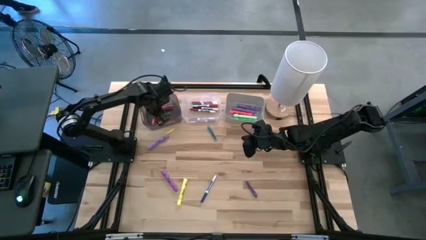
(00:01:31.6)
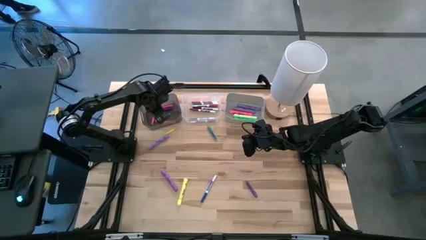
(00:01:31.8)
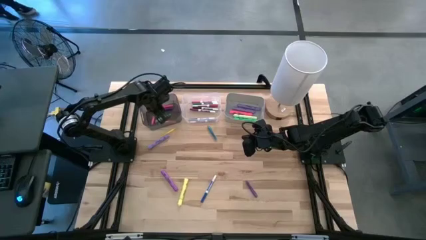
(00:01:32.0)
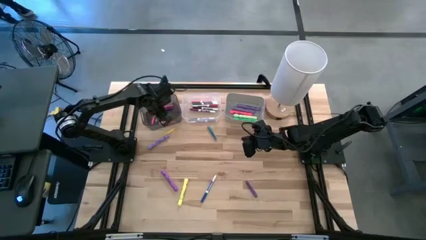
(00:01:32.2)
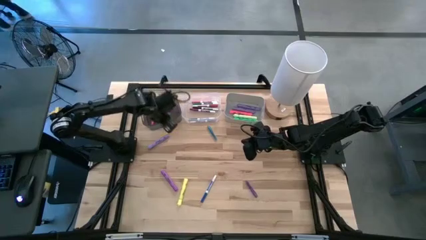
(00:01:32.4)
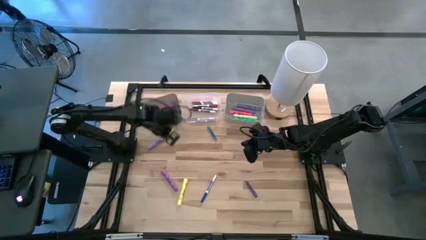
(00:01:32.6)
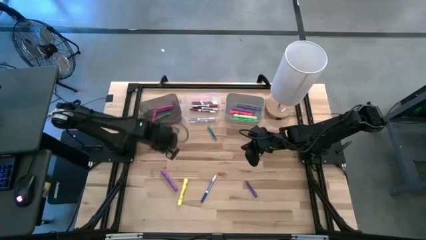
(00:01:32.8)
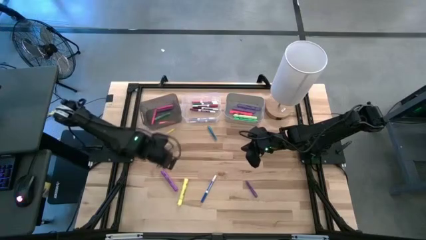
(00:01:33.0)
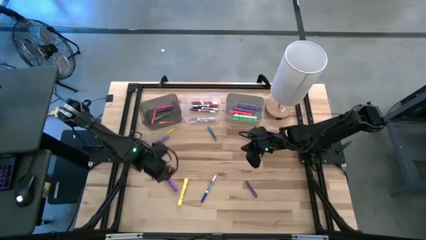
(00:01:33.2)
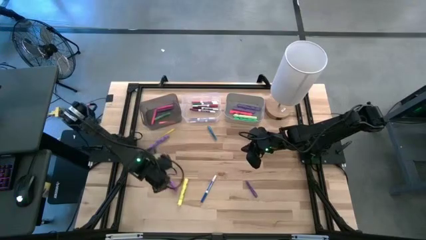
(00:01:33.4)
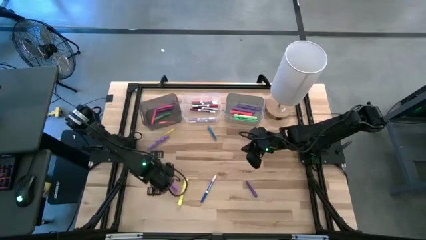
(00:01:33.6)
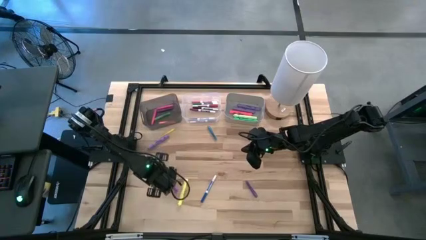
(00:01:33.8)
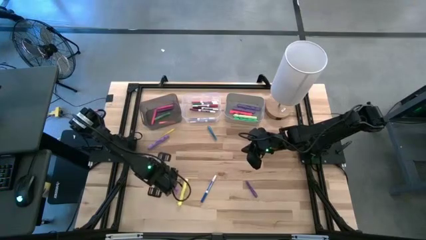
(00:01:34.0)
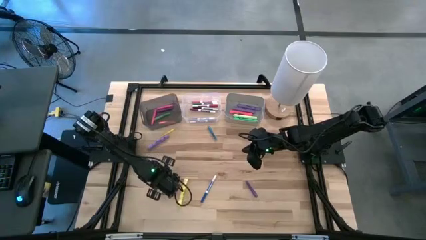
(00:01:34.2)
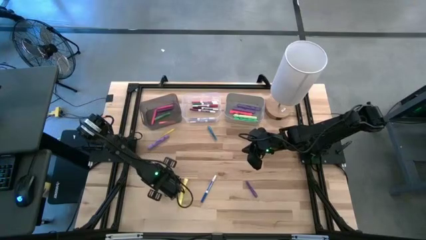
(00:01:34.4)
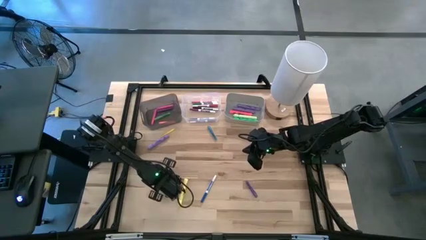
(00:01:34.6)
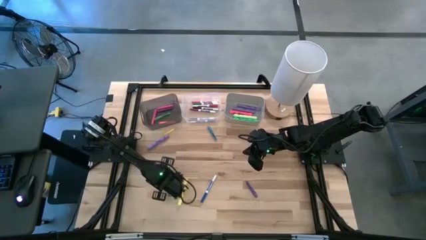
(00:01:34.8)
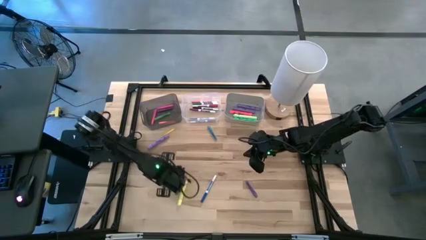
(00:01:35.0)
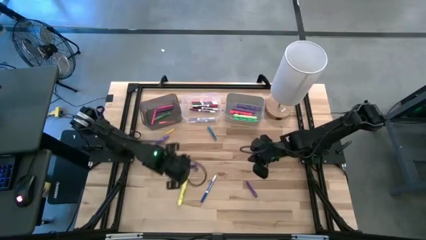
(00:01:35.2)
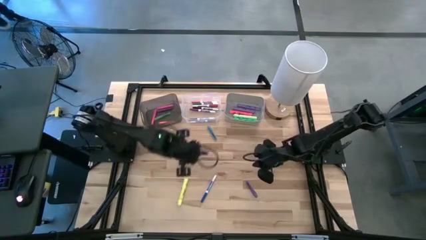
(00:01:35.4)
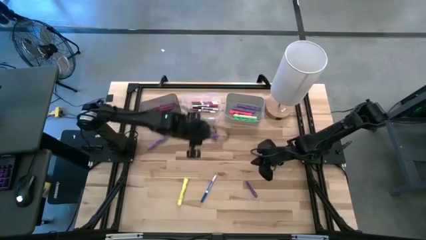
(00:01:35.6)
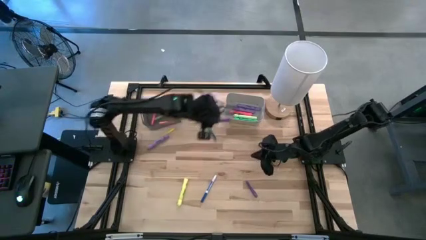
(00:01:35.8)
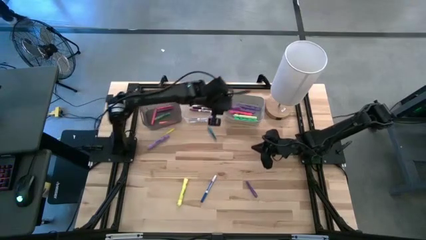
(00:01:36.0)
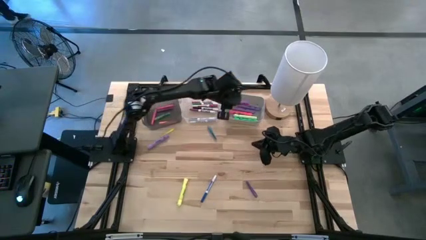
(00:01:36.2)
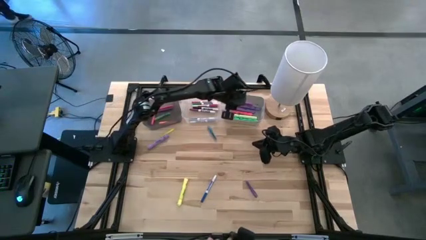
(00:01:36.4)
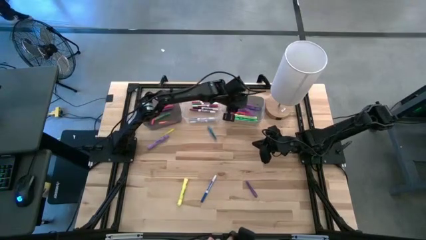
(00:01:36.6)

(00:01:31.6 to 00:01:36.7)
Task: Pick & Place Markers
Put the violet highlighter pen into the gray bin

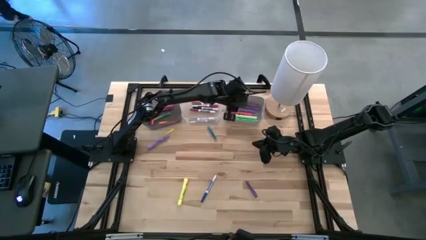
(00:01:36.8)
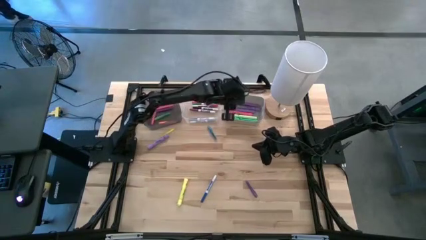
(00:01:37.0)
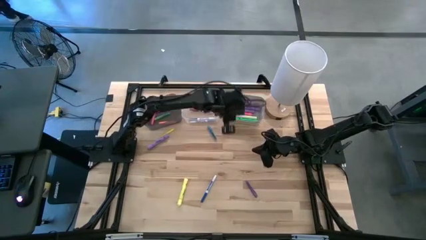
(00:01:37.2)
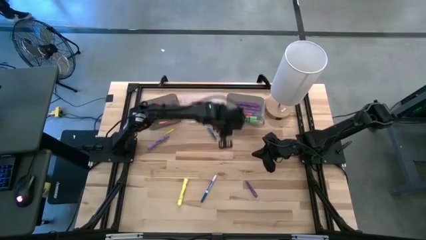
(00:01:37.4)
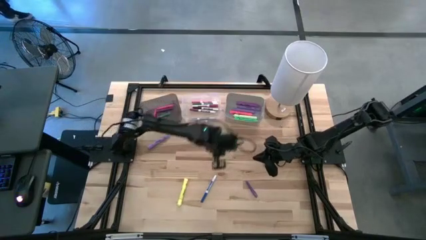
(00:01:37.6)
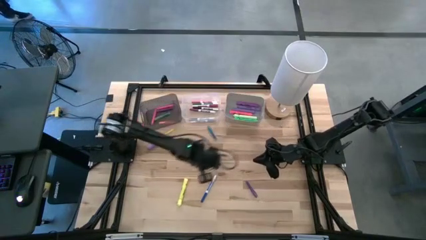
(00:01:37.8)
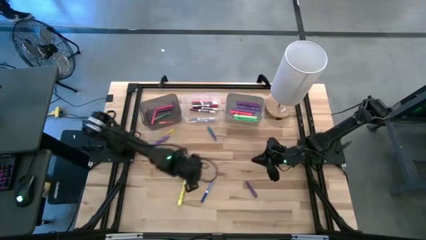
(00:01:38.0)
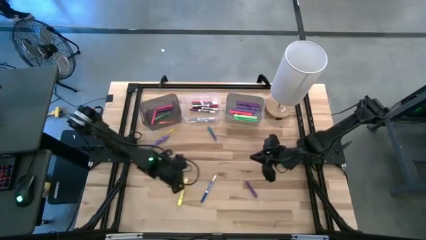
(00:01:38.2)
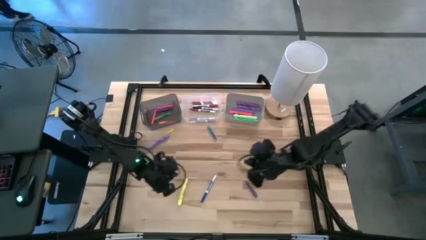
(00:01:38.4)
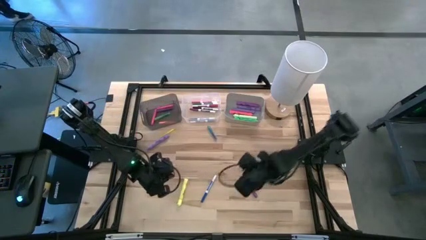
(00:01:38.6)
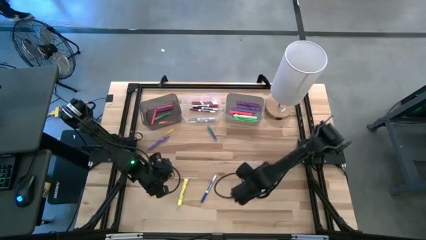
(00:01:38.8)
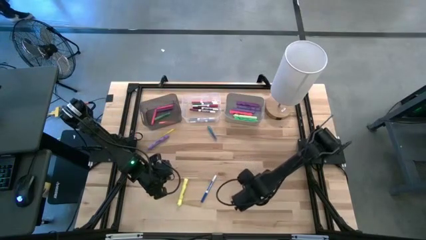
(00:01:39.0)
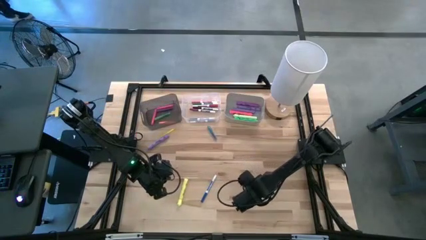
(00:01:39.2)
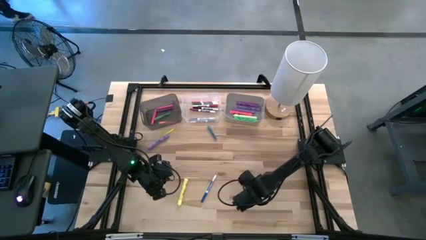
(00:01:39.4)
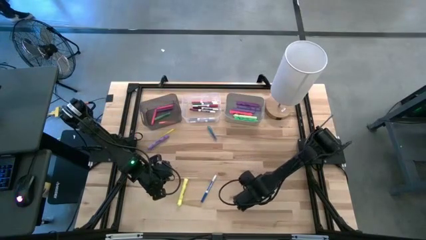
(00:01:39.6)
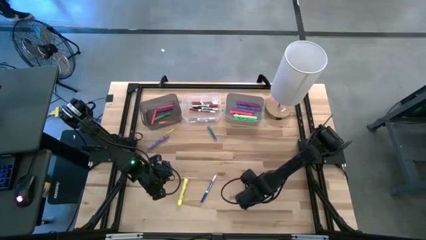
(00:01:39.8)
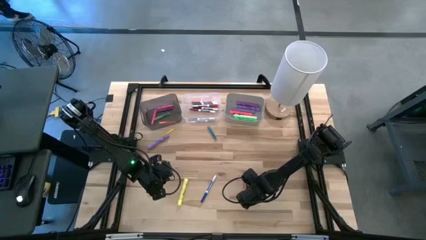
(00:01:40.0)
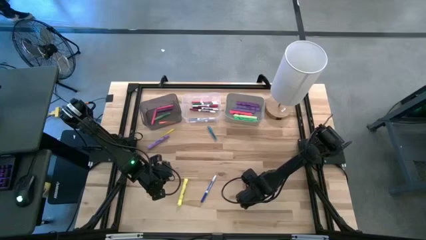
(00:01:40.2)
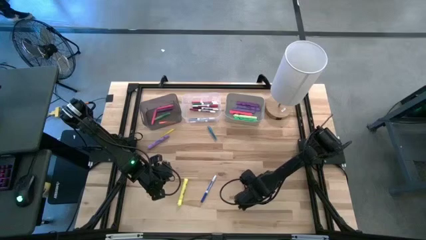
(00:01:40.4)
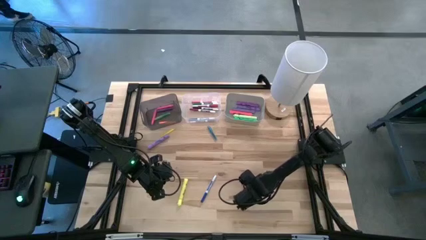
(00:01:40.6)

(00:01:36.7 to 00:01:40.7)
Put the violet pen into the black bin

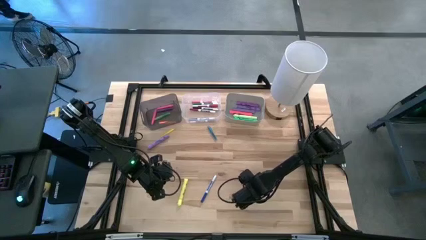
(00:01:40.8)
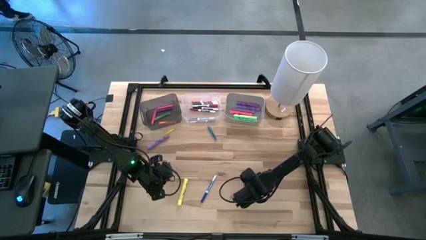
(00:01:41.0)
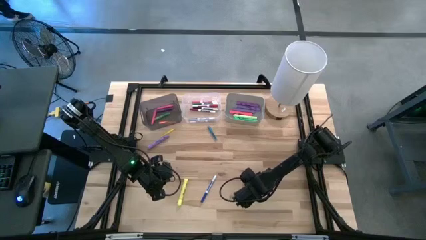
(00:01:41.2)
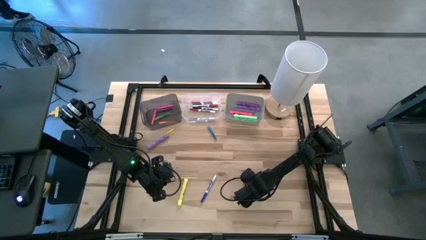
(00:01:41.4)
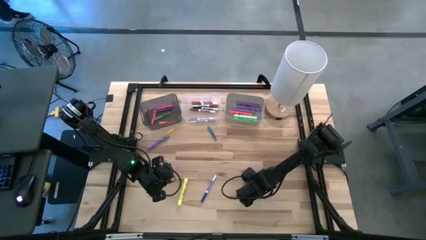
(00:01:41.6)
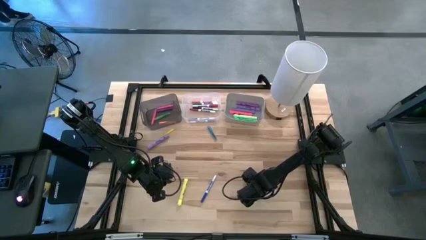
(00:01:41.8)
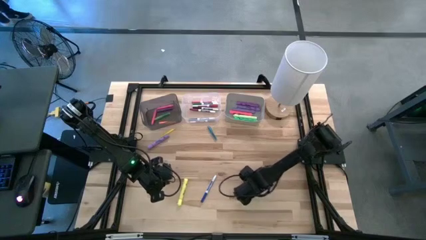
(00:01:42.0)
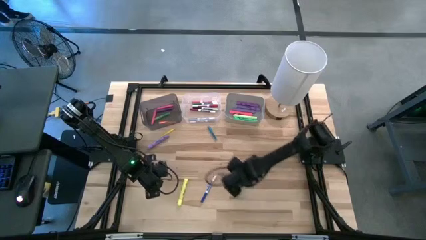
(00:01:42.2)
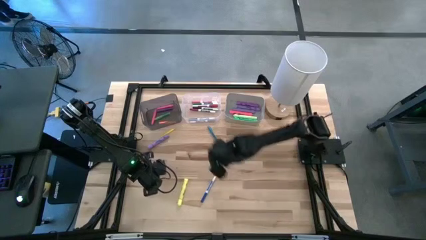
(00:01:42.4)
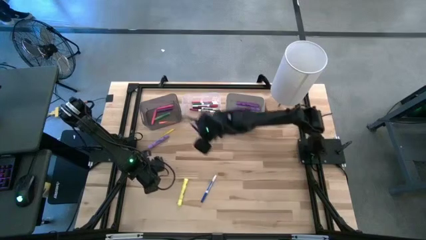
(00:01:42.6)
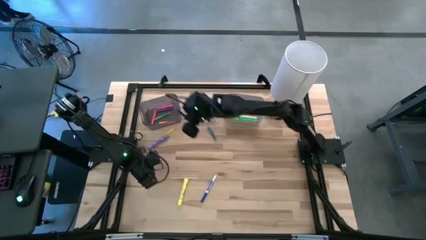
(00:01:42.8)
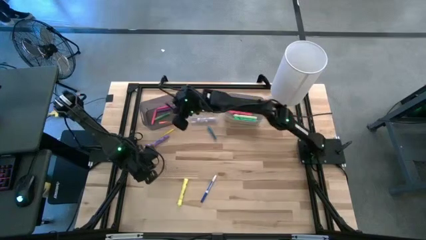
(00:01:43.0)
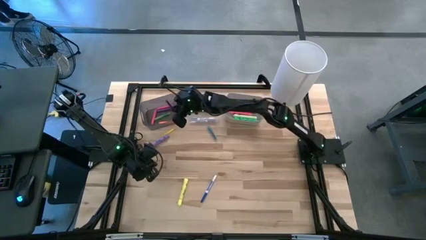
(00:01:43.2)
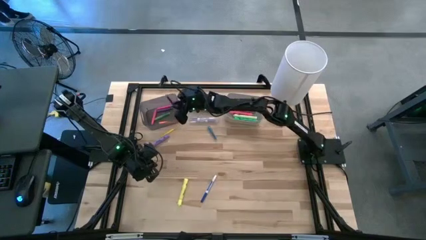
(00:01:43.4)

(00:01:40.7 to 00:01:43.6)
Put the violet pen into the black bin

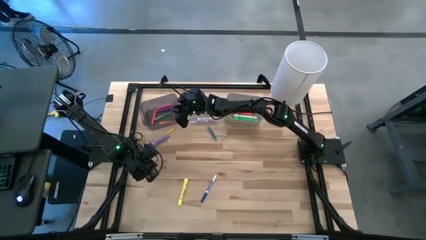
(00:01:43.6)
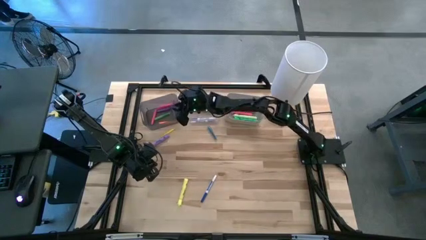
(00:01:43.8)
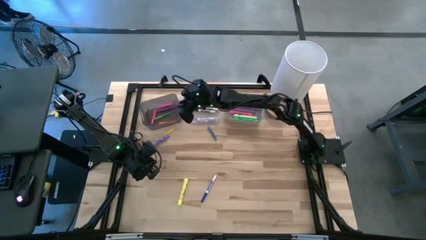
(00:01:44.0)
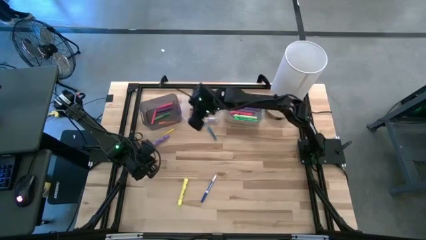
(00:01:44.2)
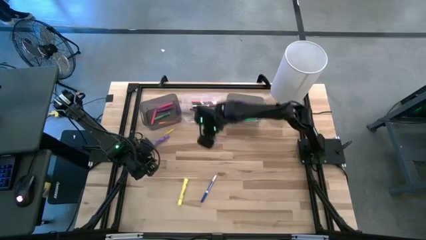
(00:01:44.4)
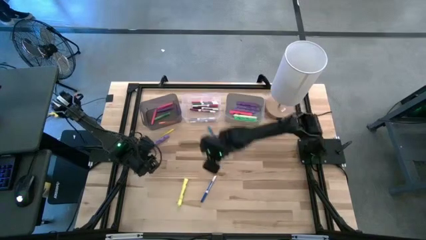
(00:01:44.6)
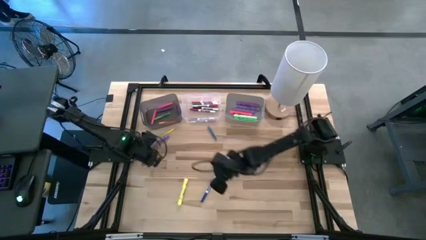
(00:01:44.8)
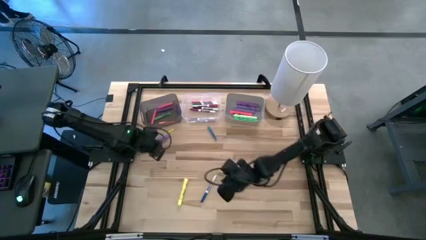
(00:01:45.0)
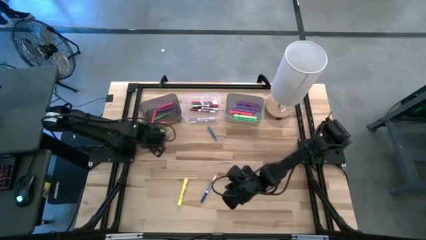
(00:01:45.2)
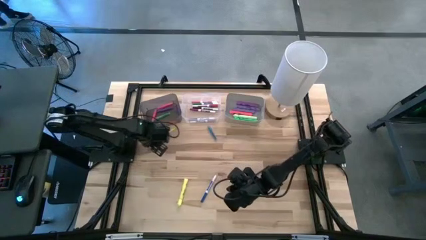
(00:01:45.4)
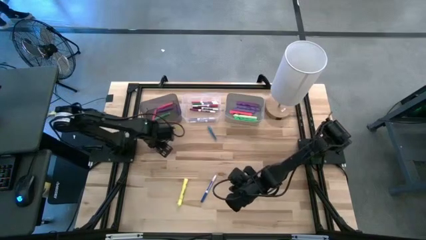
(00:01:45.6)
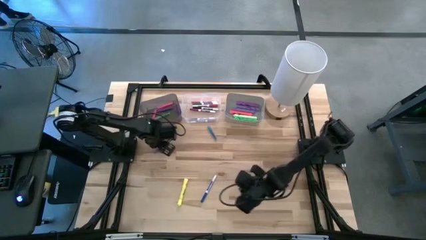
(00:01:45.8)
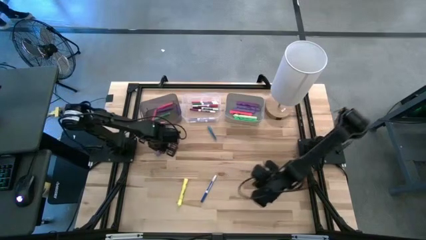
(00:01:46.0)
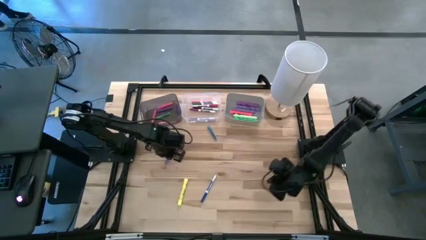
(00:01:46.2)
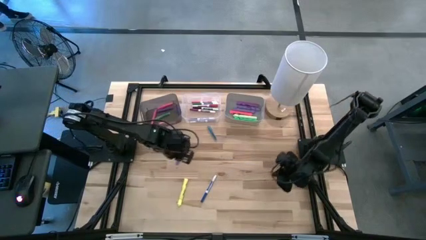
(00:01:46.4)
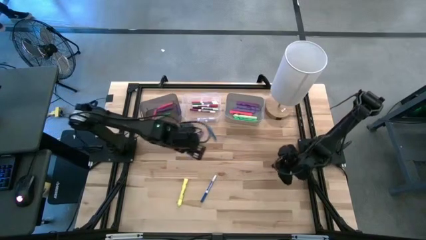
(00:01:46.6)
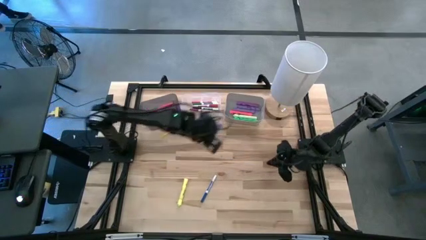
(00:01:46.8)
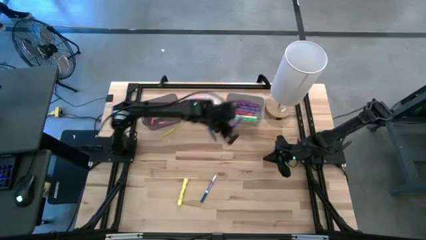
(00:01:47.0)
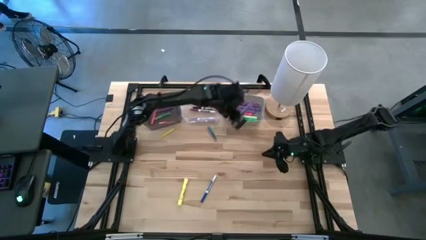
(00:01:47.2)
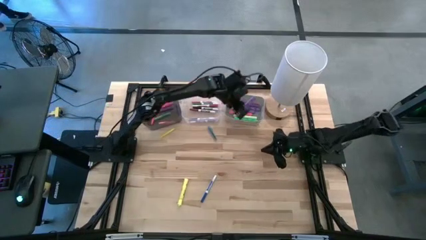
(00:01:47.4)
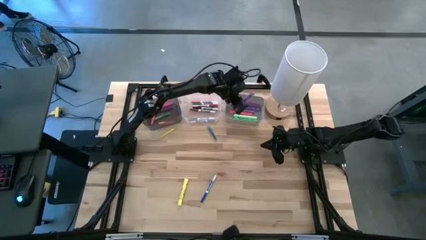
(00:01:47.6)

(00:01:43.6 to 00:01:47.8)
Put the violet highlighter pen into the gray bin

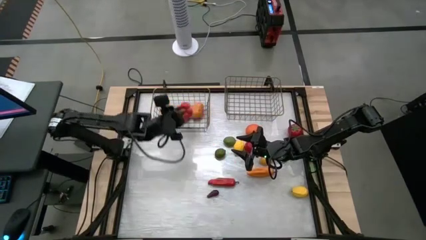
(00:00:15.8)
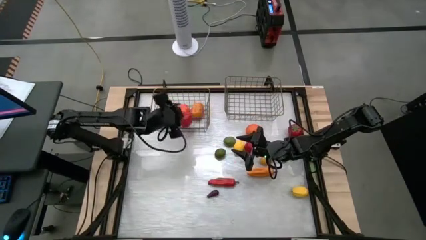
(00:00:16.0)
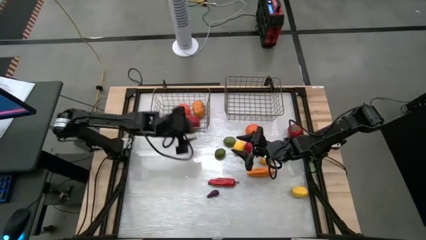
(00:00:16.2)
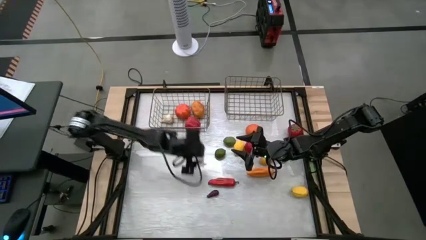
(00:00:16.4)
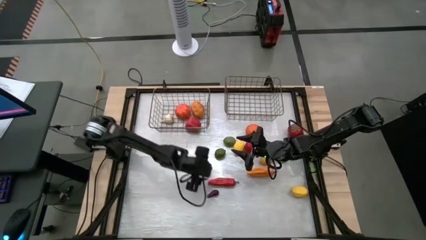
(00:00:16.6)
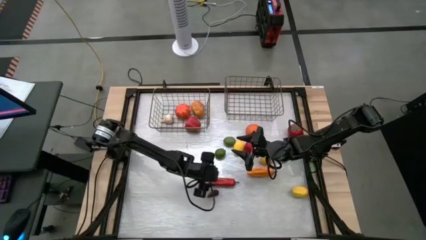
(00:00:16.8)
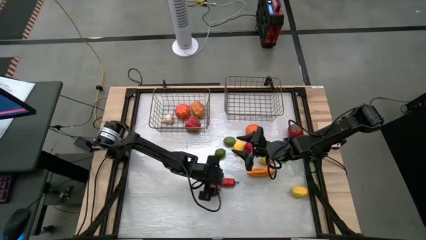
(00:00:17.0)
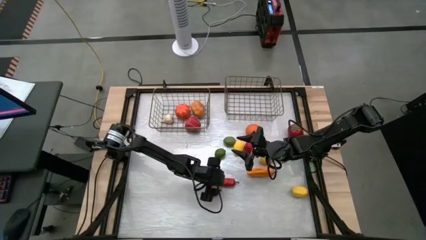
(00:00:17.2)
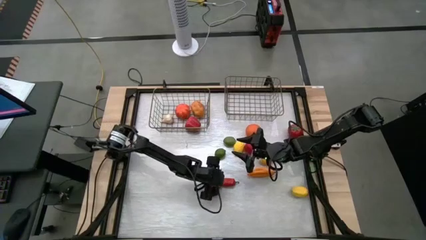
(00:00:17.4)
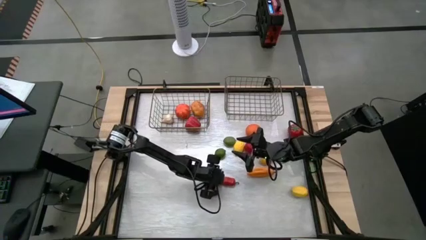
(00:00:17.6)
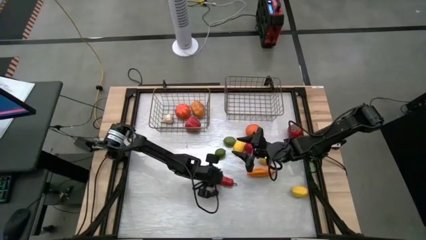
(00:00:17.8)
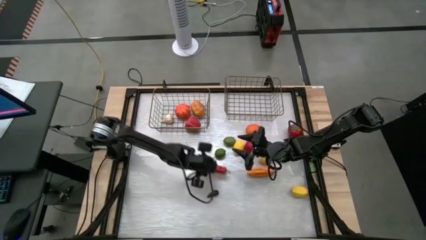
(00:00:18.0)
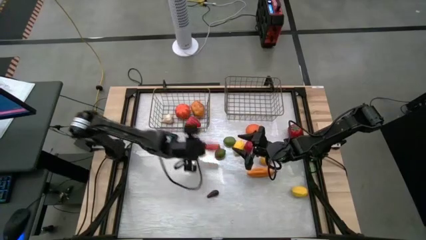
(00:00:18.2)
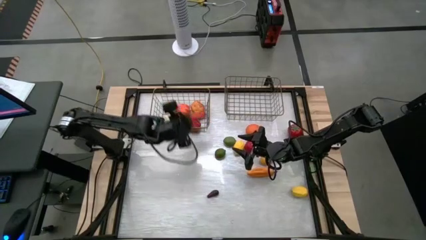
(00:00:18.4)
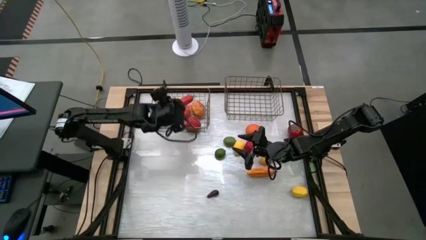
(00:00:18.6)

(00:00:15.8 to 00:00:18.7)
Task: Sort produce into baskets
Put the red chili pepper into the left gold wire basket
